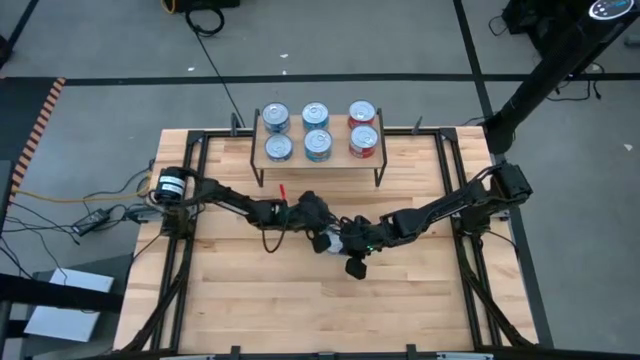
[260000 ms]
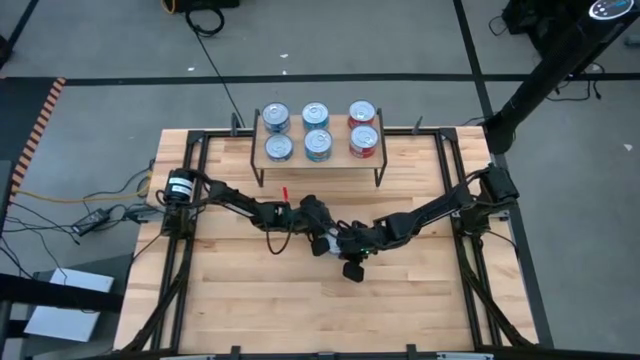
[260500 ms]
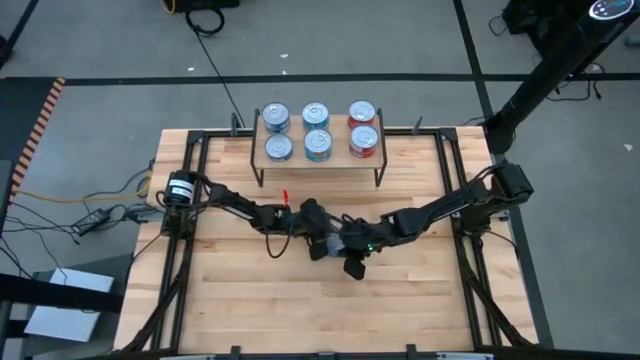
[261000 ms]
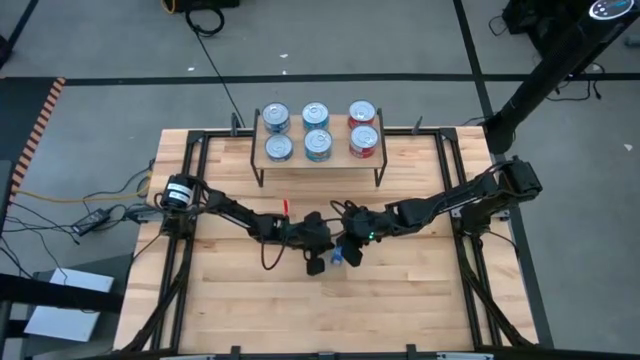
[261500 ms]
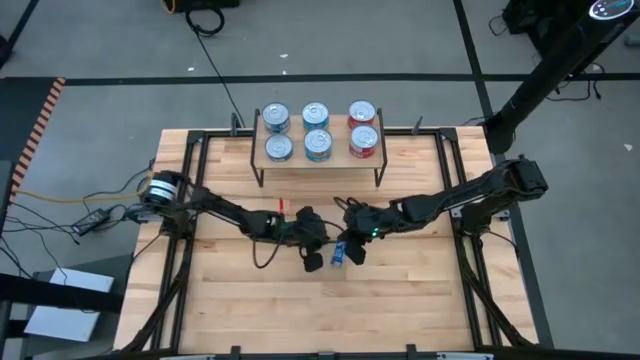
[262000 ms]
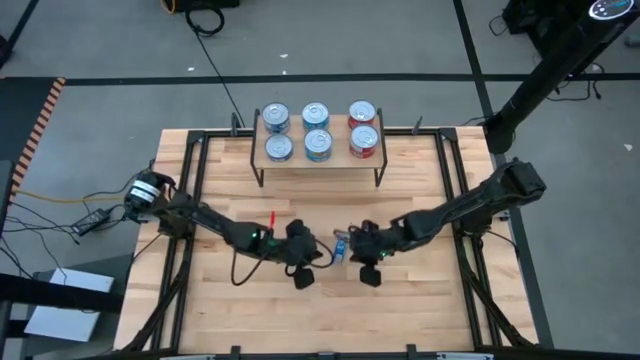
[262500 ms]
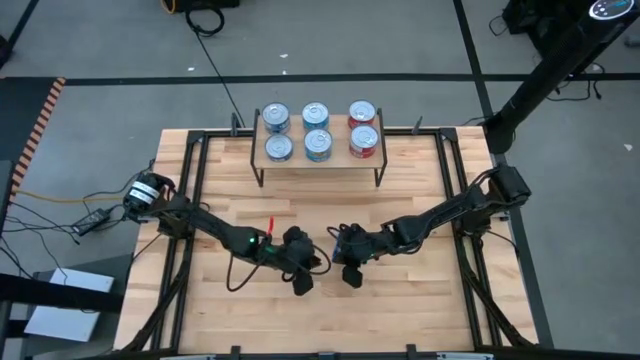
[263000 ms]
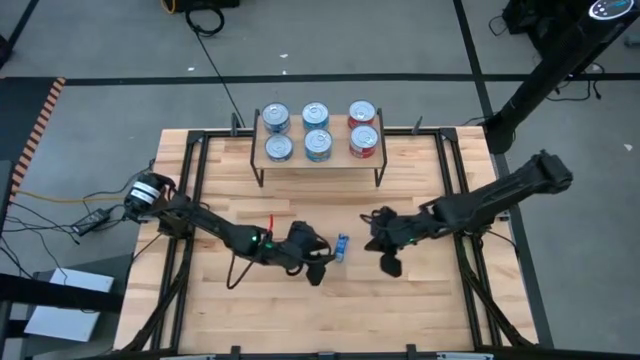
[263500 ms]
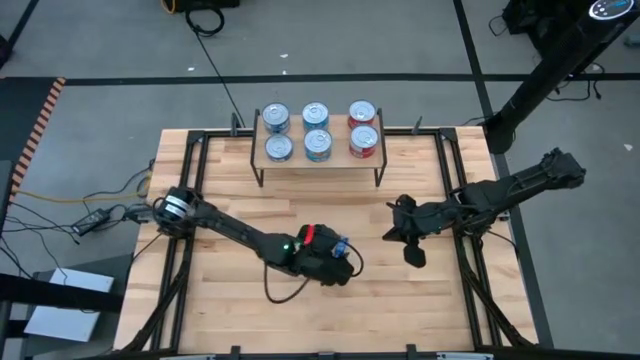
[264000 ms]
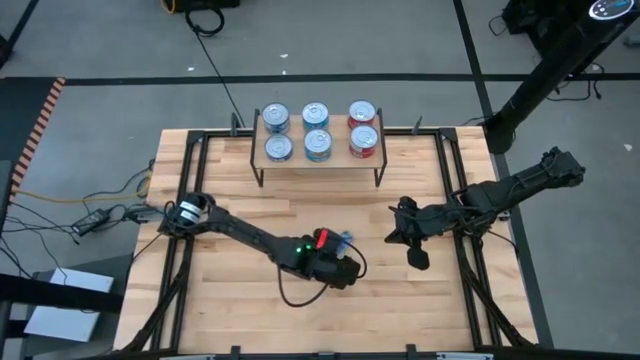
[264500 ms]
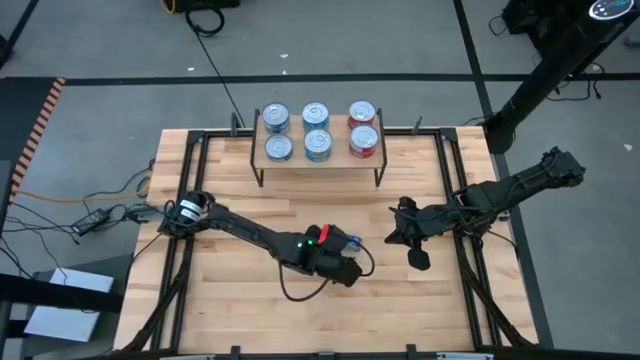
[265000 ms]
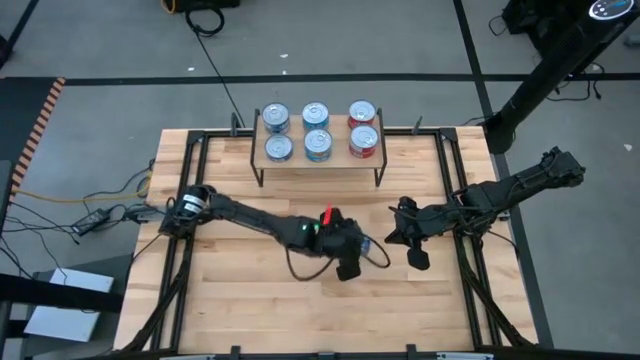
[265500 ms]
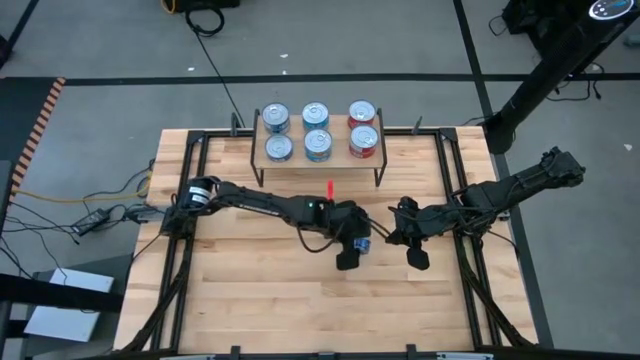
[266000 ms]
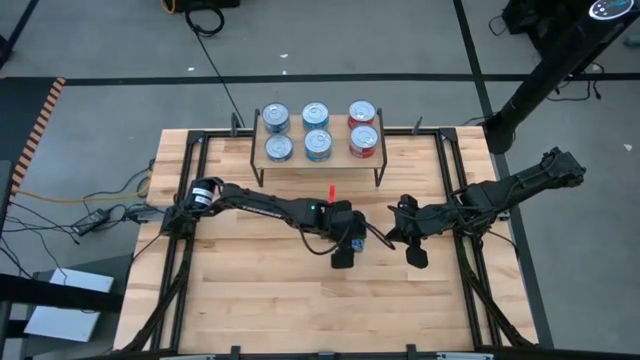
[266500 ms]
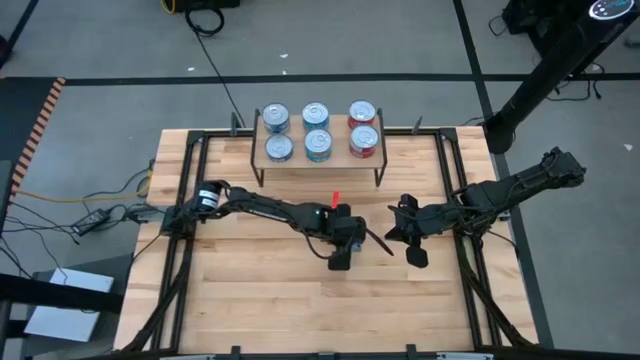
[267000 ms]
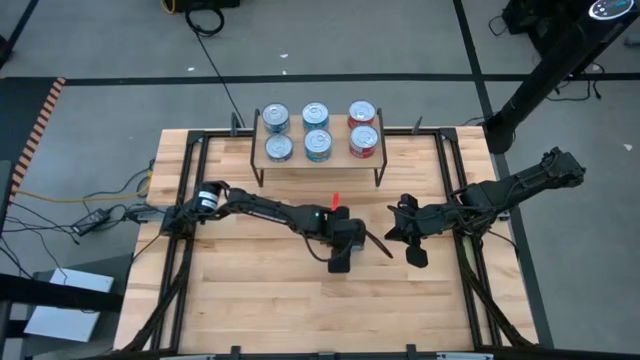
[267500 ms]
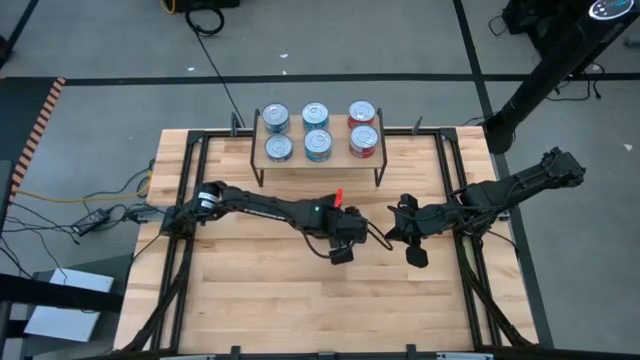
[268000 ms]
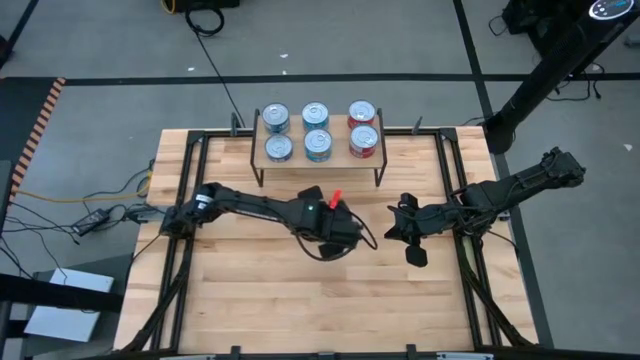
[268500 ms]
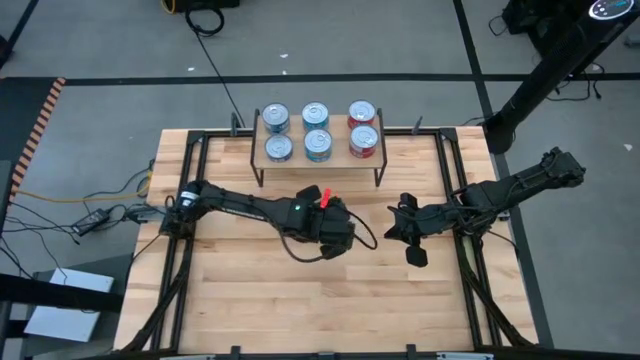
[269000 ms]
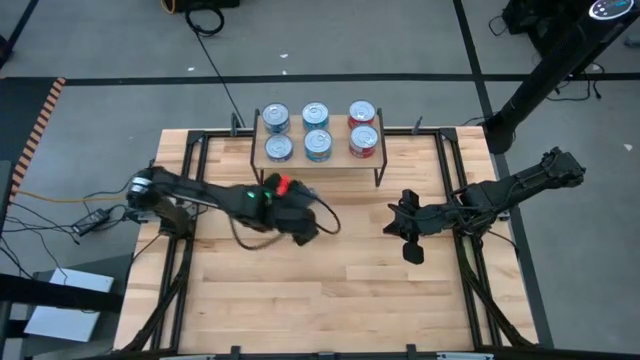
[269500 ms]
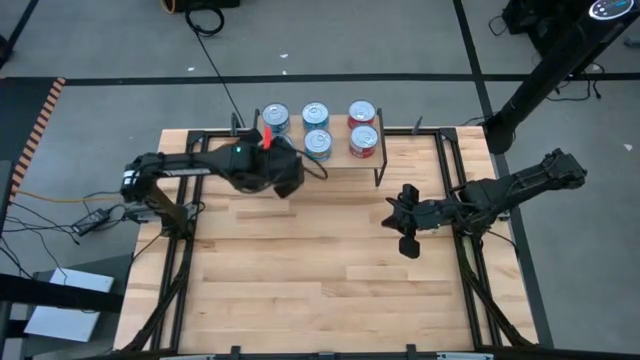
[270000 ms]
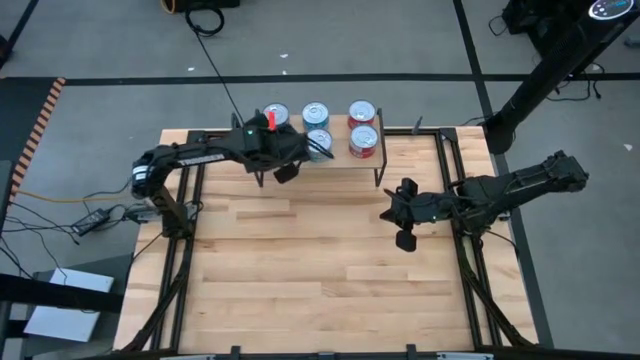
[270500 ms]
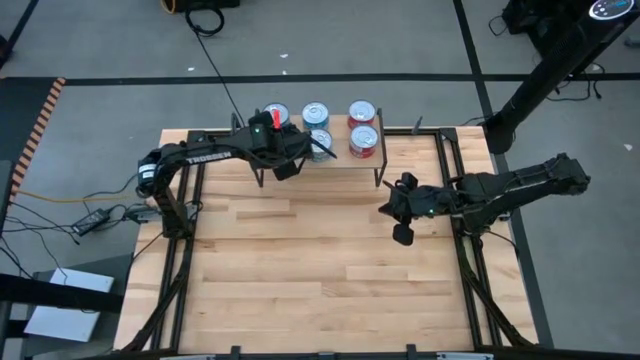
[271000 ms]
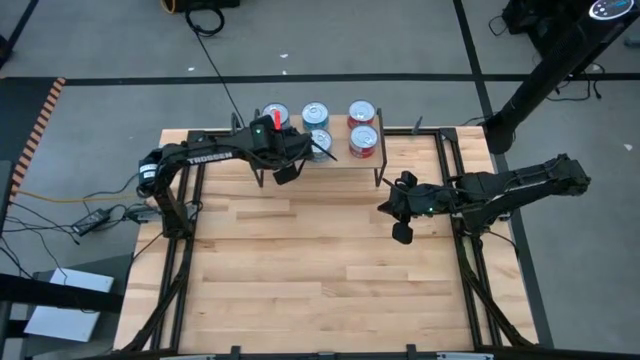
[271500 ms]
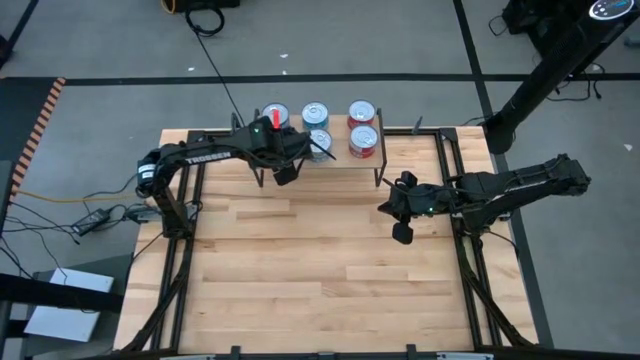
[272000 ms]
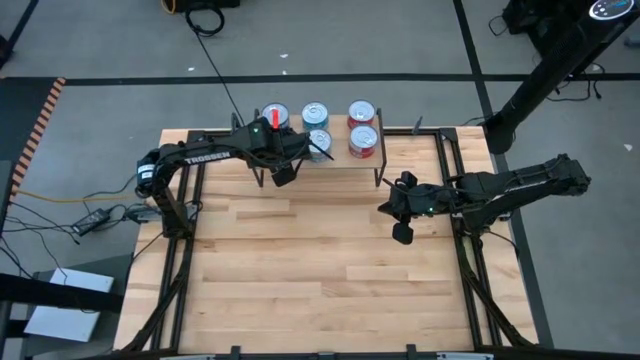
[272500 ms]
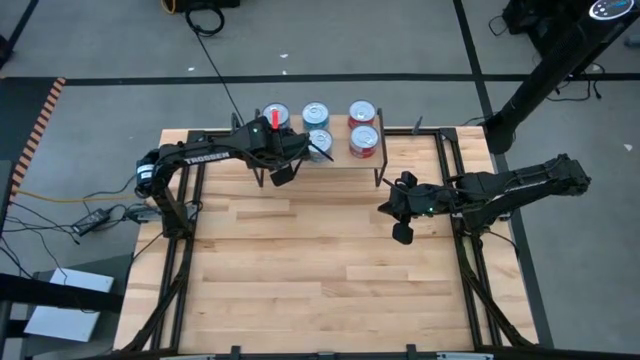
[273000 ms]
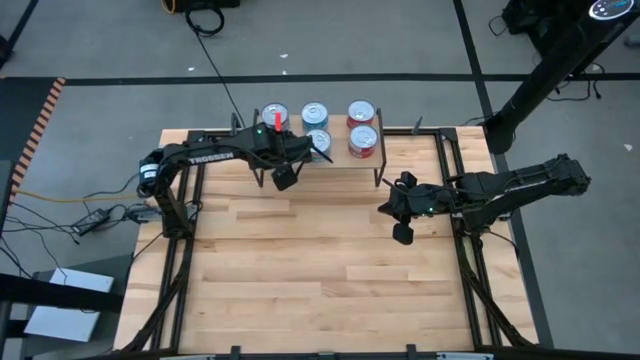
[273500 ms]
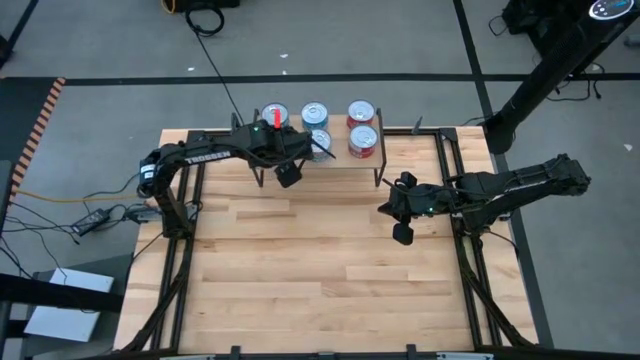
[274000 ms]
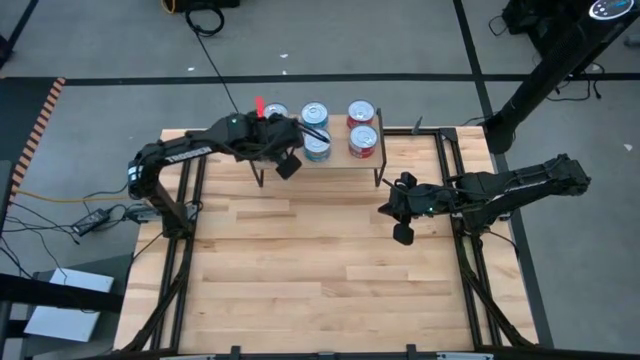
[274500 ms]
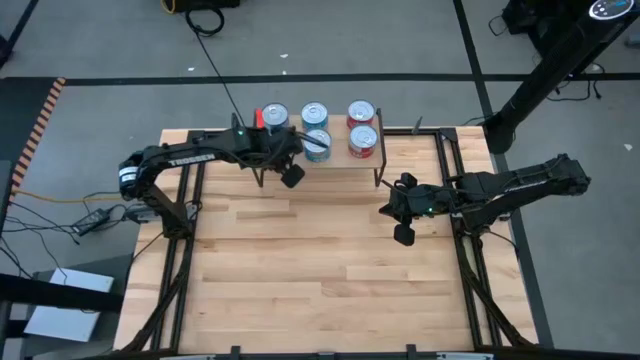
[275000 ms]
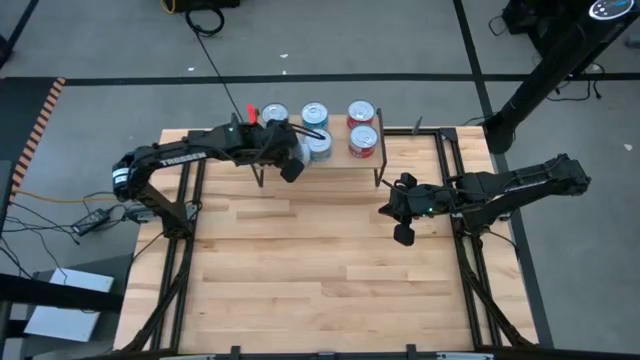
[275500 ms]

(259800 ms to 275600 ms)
Task: Stack canned seafood by type on shelf
Stack the blue can on top of the other blue can on the shelf

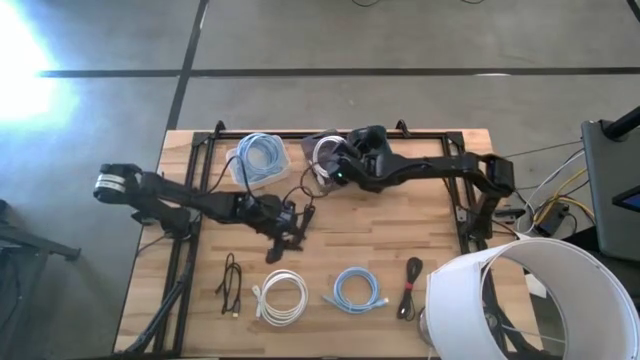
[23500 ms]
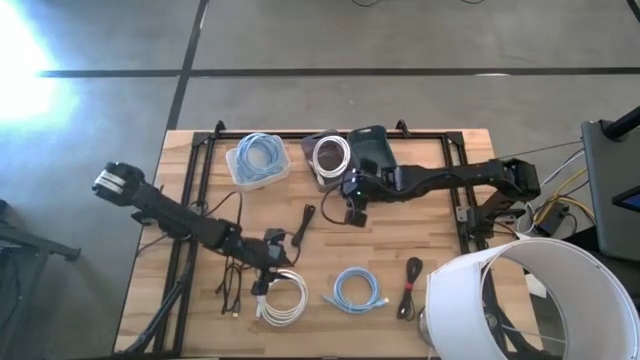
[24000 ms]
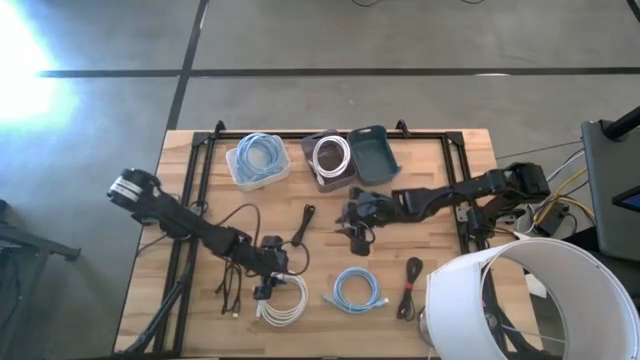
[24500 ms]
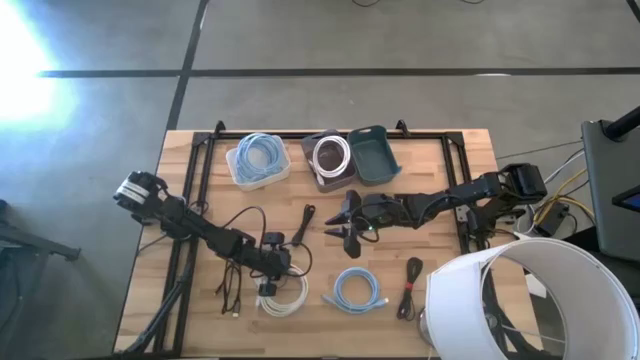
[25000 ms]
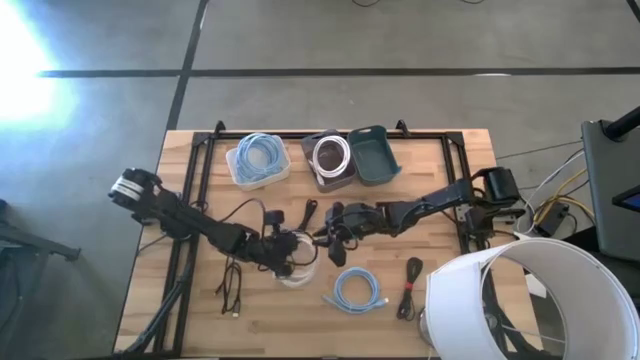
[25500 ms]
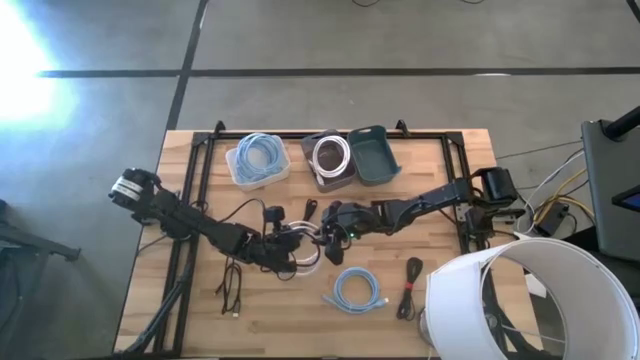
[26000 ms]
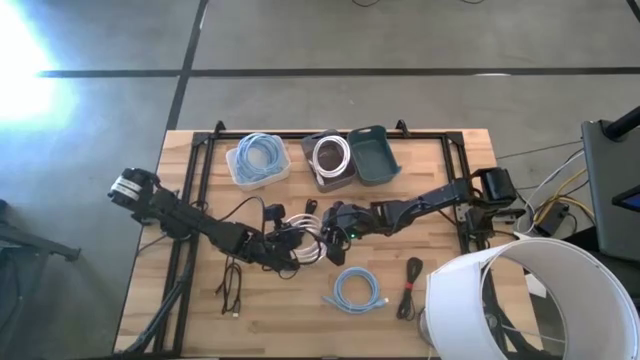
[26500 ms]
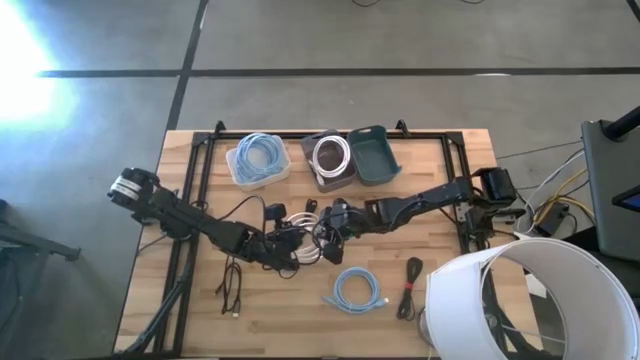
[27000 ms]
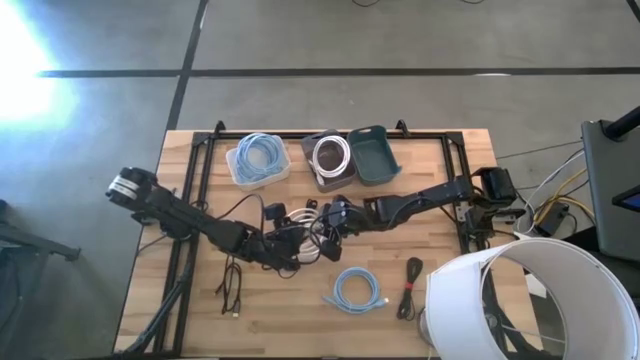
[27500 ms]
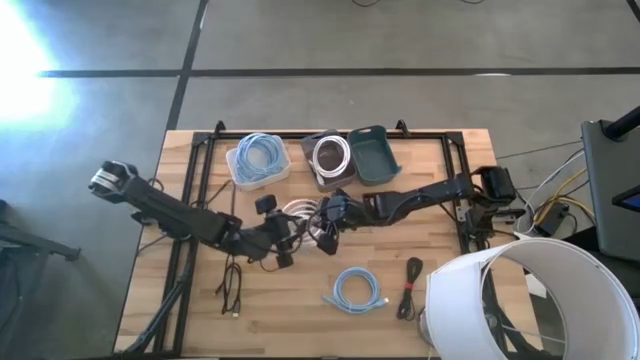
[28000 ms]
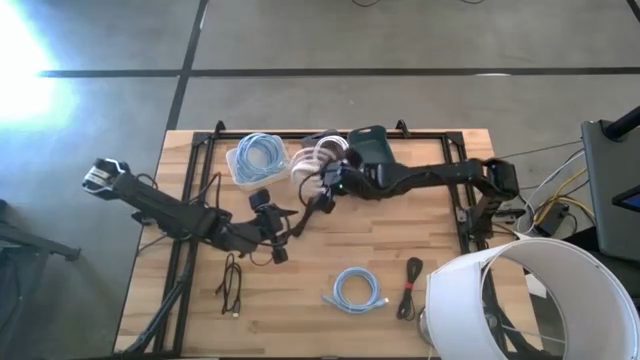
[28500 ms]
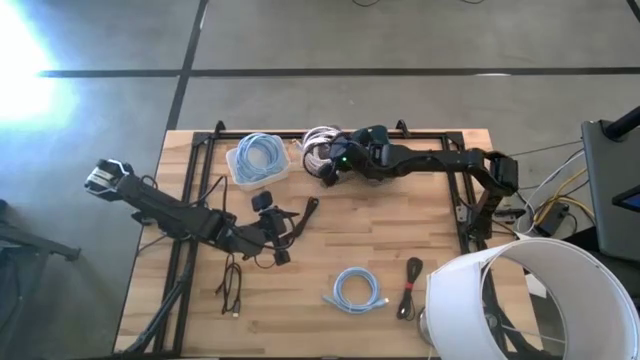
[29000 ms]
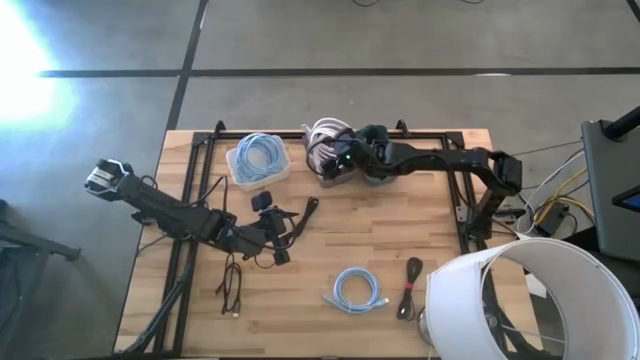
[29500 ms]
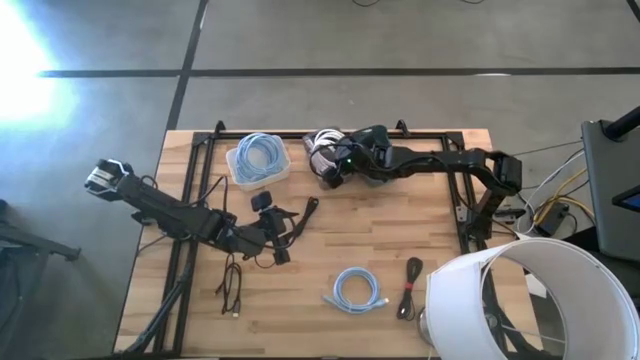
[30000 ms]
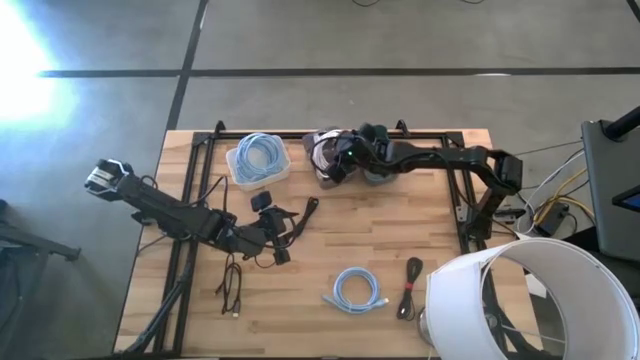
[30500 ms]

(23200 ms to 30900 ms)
Task: Pick & Place USB Port
Put the white USB cable into the black transparent bin
